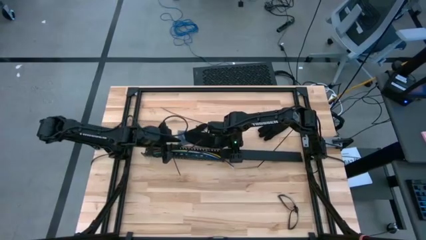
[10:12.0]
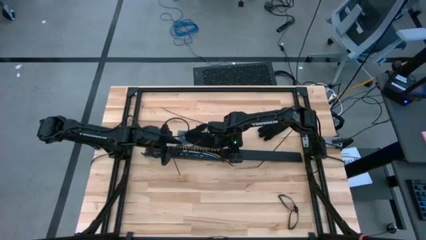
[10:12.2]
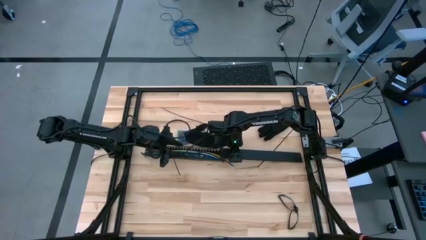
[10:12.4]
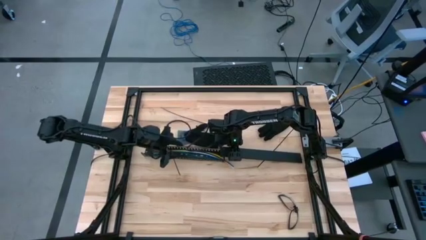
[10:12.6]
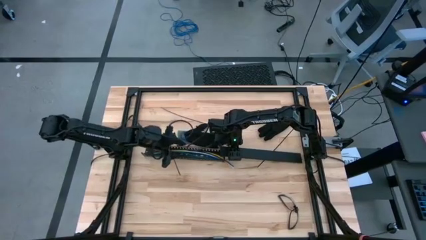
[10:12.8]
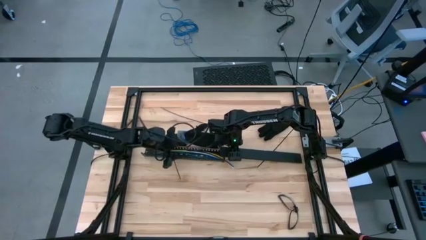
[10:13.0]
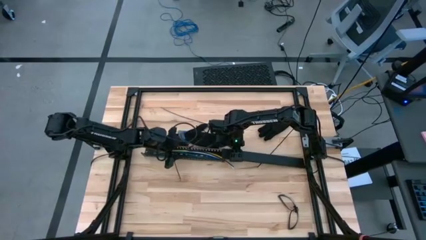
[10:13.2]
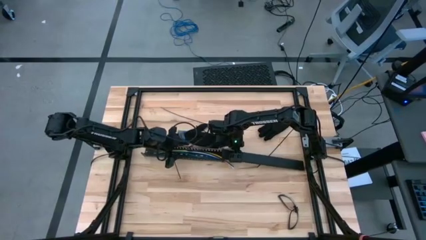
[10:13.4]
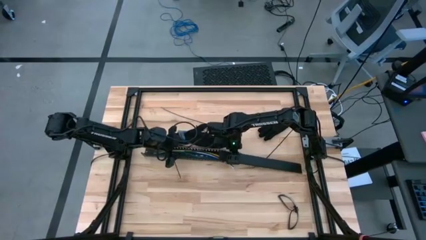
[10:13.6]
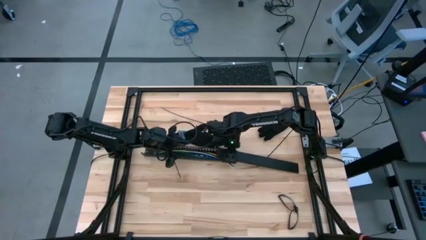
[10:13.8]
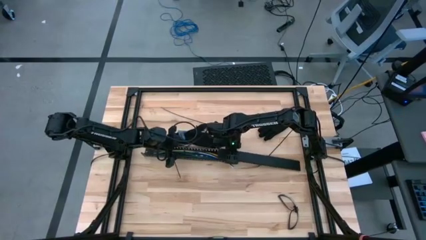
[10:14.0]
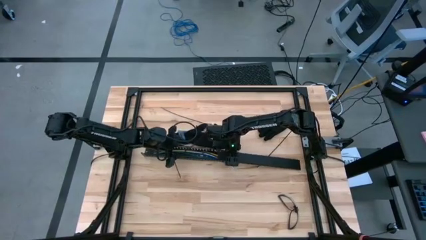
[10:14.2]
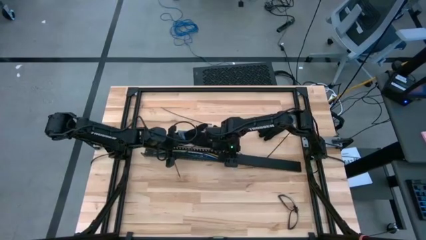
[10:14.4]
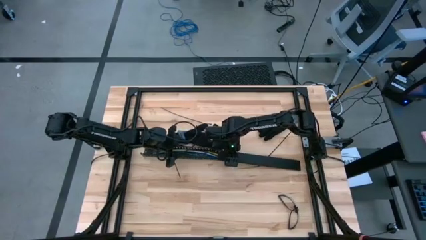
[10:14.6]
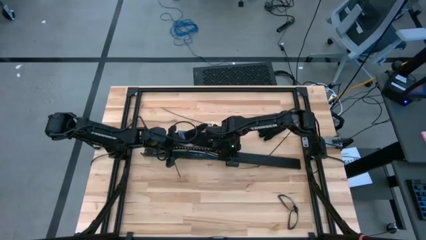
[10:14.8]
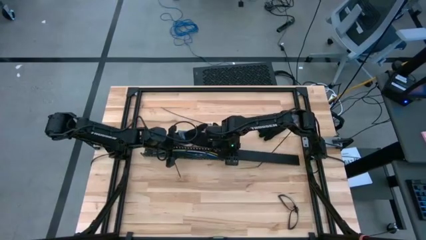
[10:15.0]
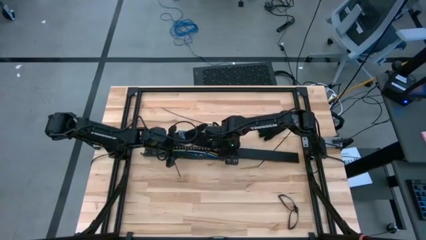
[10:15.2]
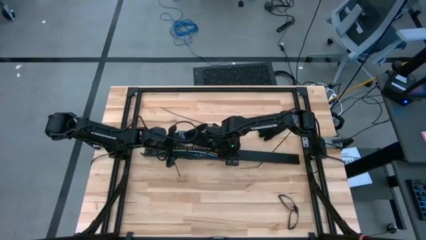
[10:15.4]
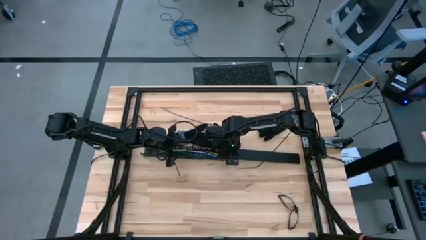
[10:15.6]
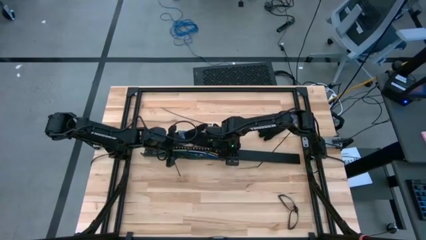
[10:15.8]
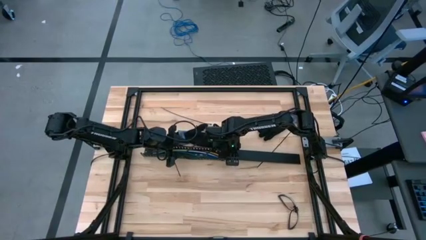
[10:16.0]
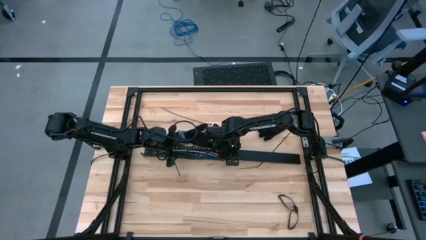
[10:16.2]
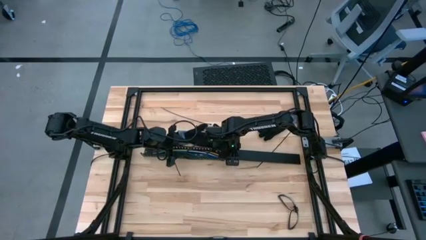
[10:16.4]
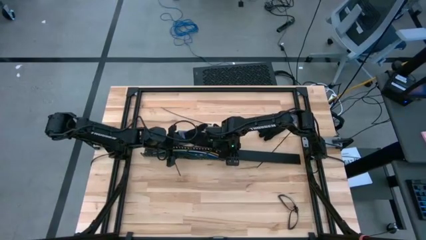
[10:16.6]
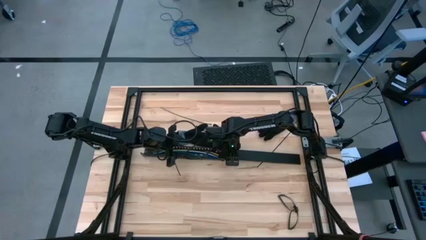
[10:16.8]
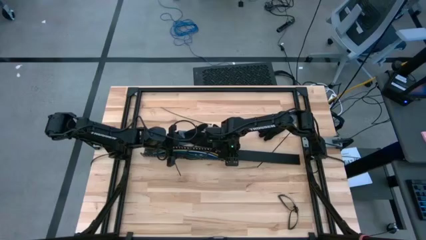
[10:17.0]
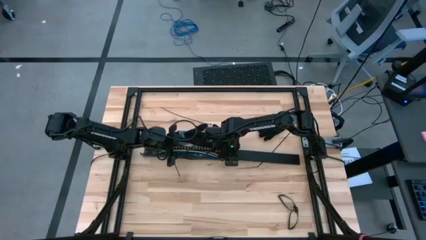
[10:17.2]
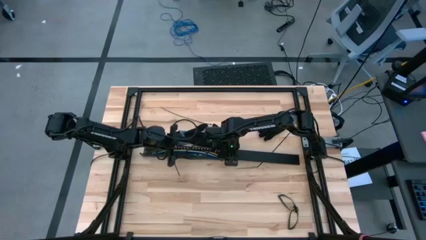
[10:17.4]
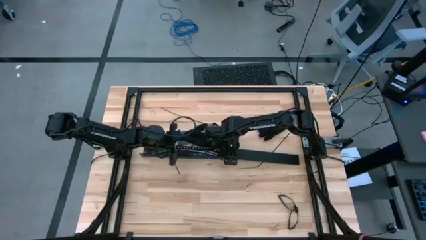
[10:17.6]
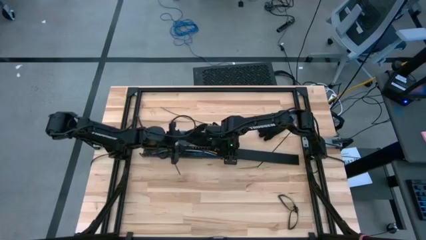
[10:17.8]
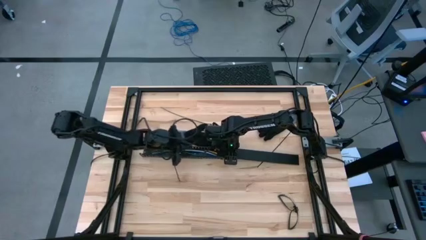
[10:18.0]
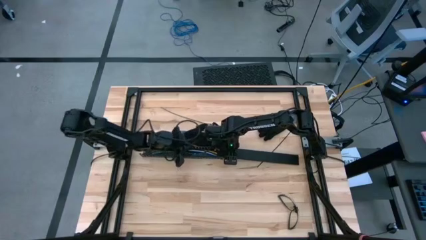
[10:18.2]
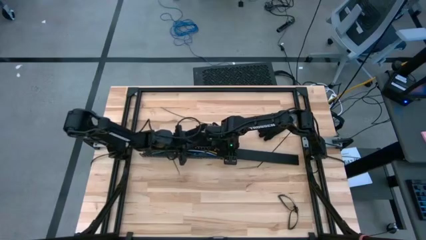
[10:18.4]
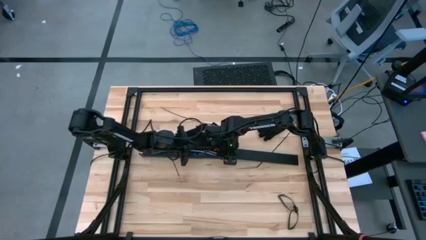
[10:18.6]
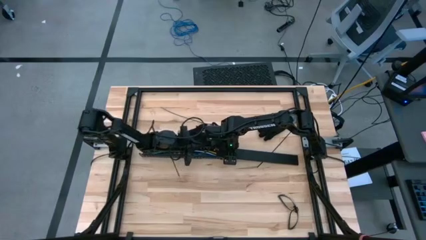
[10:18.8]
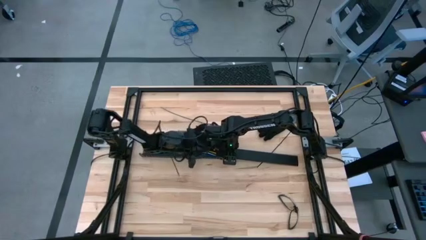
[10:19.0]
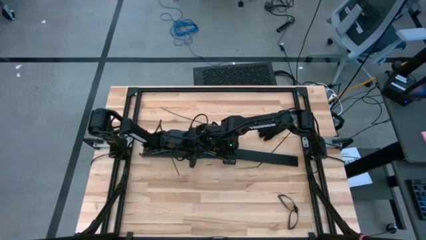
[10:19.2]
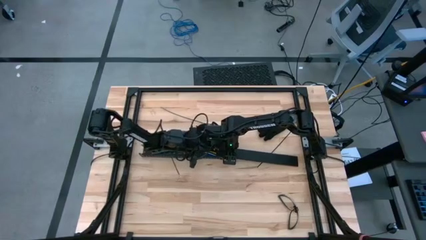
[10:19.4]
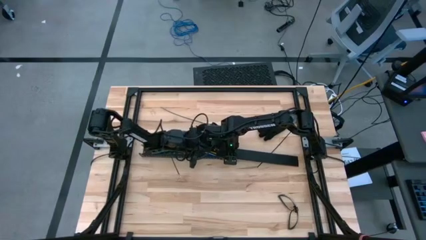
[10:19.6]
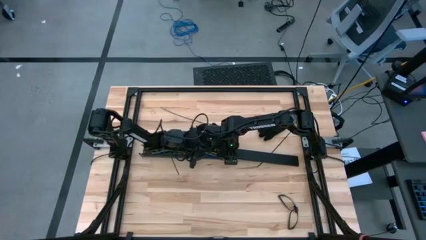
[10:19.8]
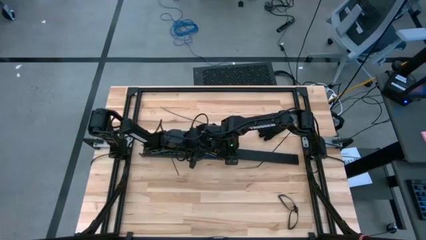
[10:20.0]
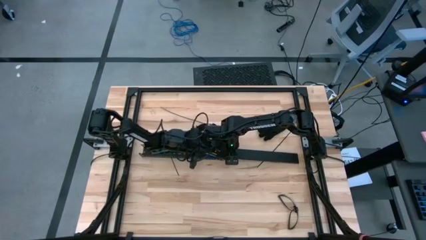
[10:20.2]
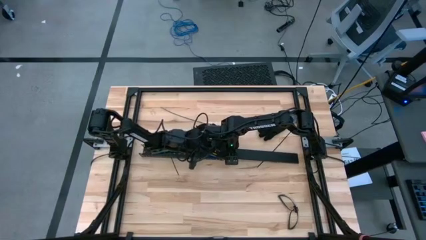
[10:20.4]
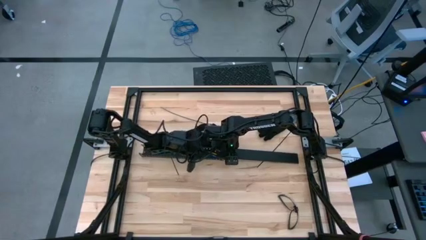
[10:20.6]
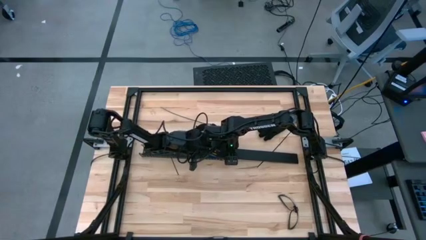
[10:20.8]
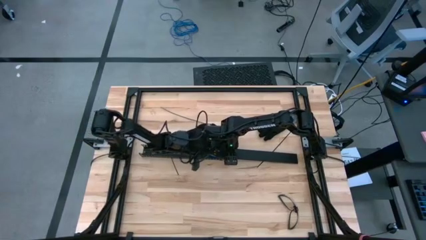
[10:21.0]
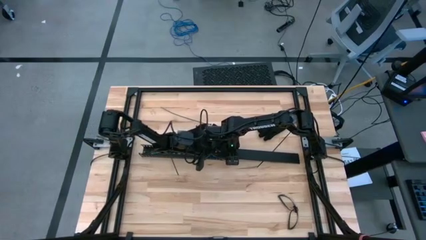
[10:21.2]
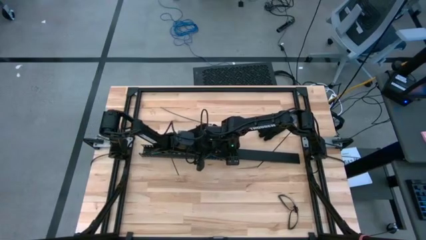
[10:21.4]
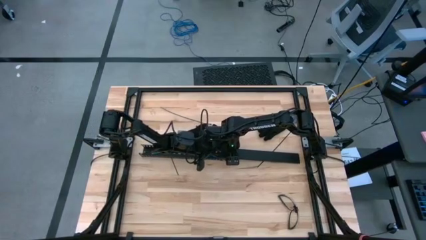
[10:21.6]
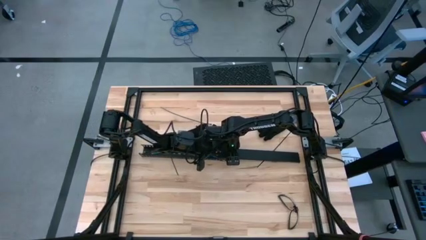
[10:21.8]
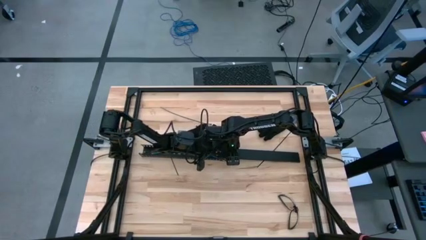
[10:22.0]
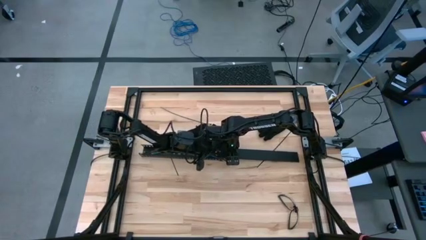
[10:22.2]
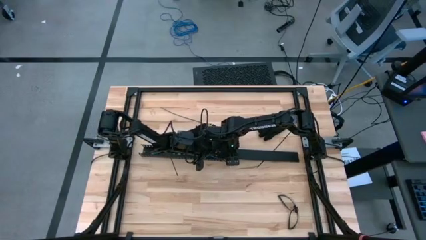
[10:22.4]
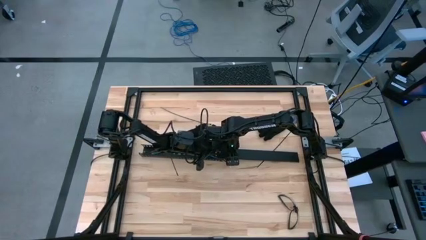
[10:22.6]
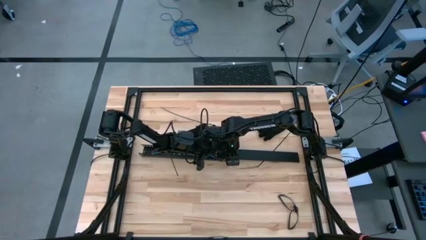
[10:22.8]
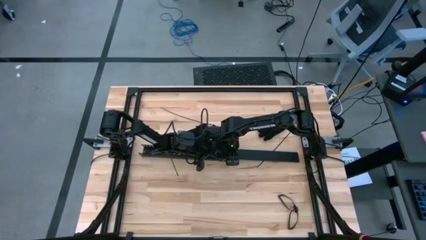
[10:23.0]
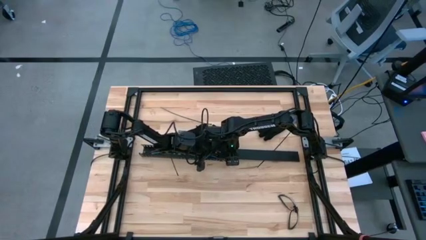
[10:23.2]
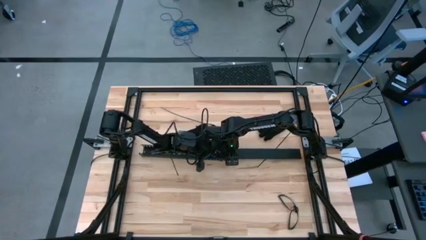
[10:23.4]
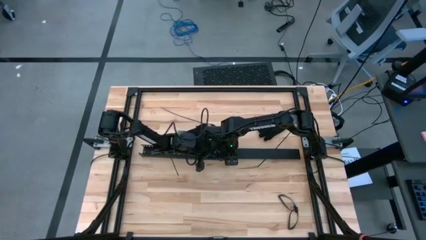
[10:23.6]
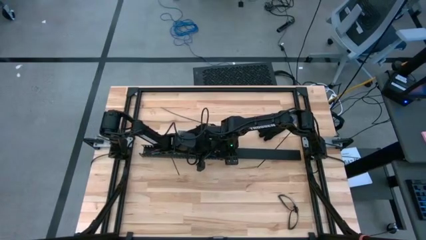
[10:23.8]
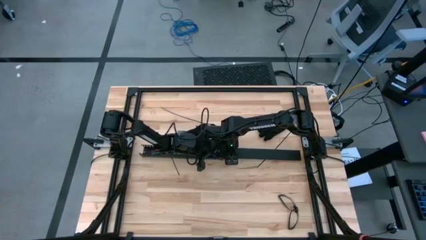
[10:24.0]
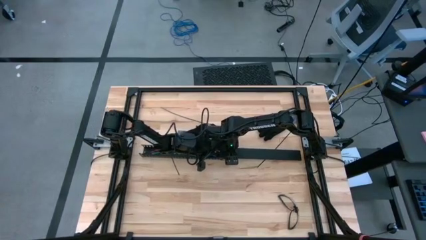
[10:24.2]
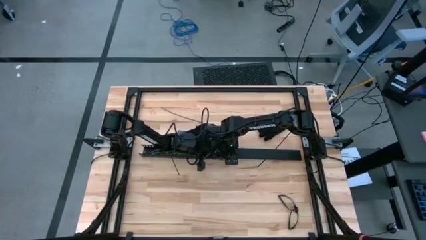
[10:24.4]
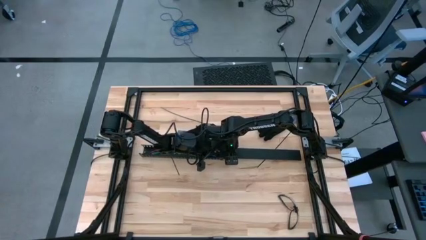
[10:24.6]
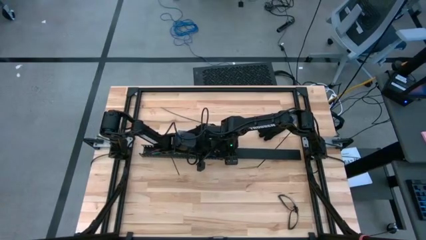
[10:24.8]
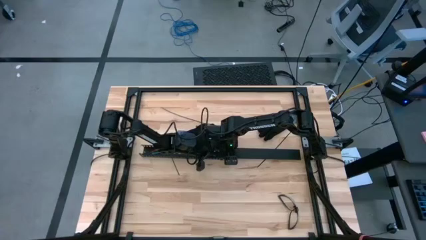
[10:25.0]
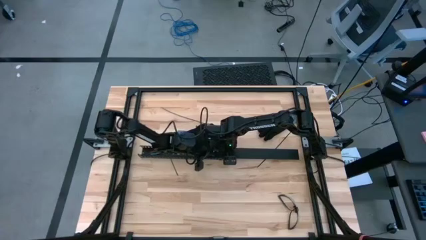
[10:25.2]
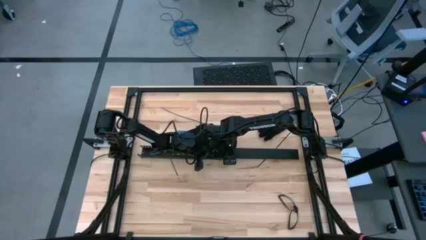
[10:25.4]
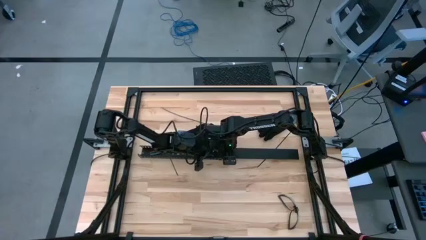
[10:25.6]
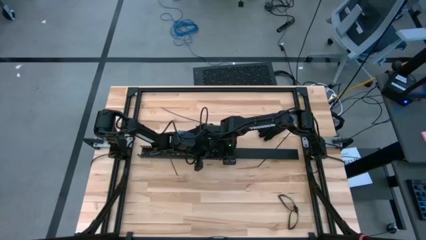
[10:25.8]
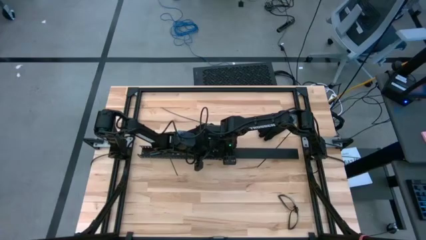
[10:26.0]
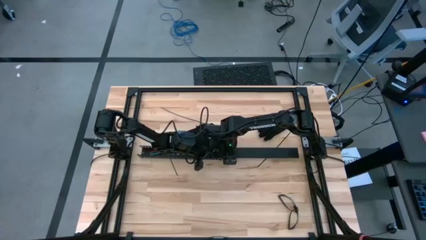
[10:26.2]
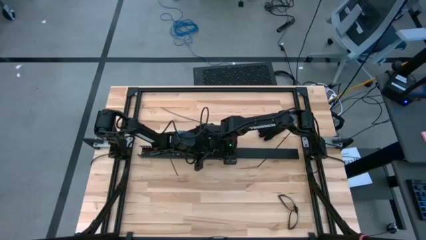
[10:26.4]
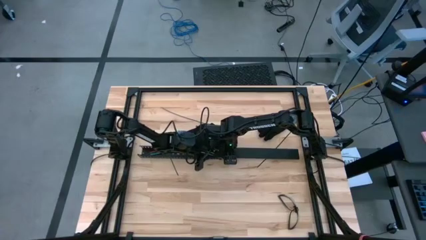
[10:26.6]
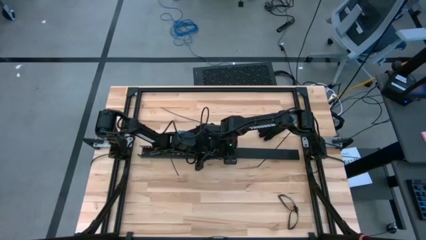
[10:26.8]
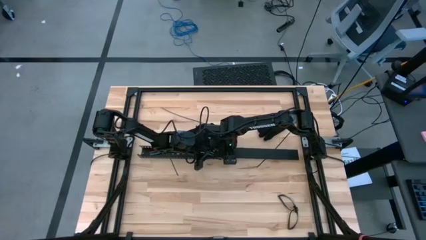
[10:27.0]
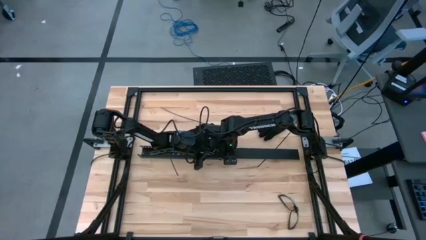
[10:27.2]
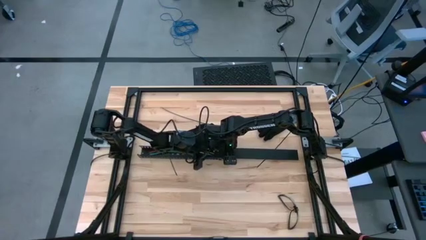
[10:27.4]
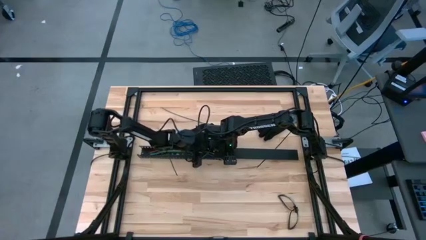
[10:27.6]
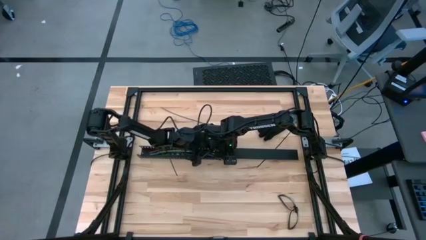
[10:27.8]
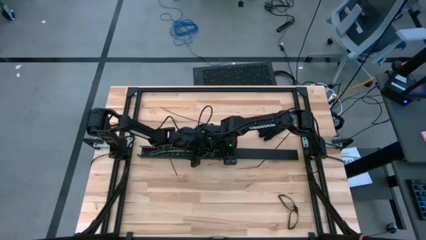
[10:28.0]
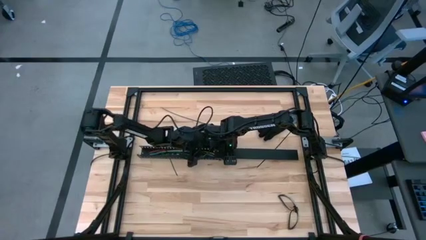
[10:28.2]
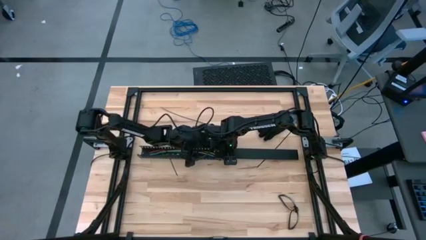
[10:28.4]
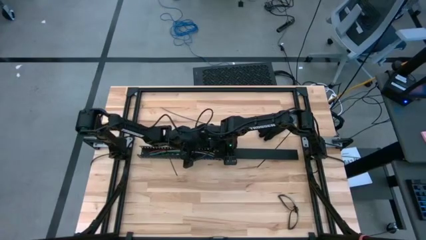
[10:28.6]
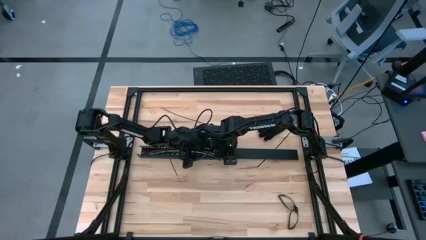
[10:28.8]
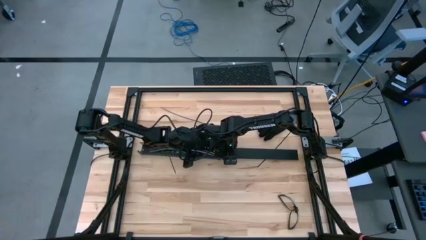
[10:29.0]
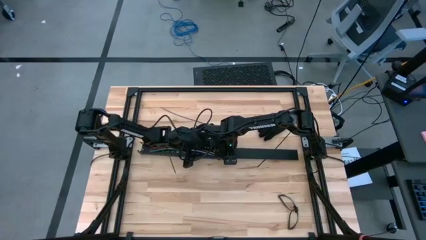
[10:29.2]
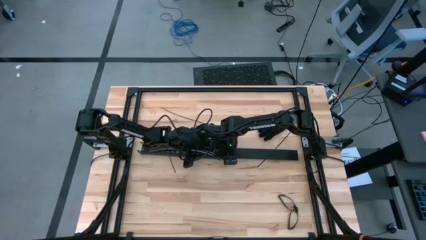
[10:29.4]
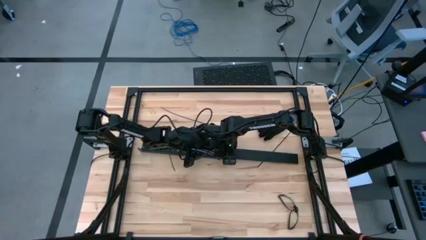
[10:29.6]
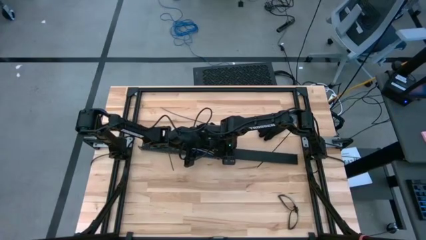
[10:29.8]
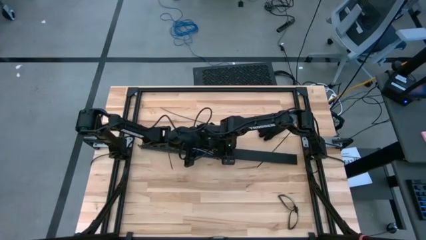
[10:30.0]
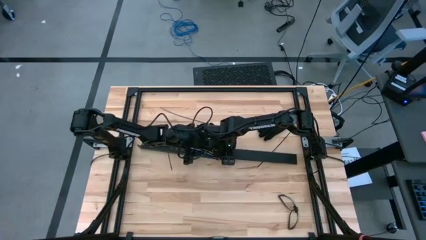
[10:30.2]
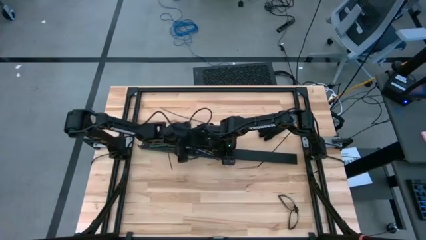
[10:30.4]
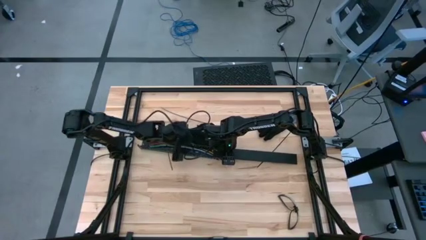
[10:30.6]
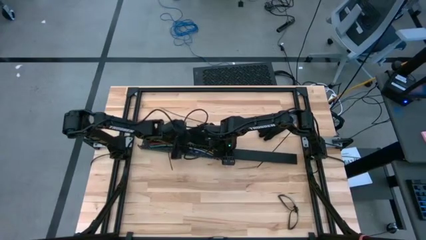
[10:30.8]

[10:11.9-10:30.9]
Task: Ziptie cables
Close the cable duct
